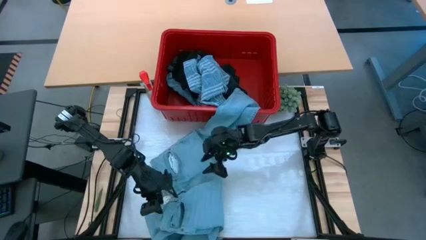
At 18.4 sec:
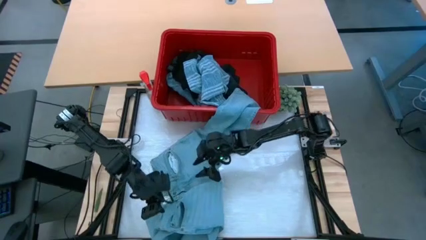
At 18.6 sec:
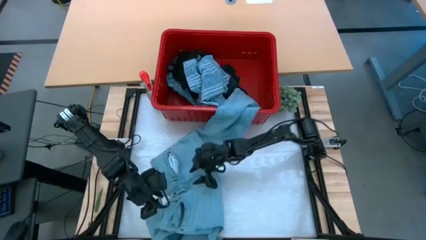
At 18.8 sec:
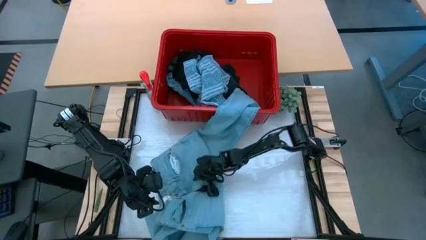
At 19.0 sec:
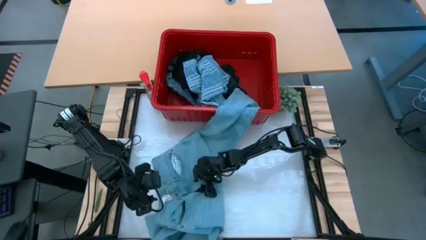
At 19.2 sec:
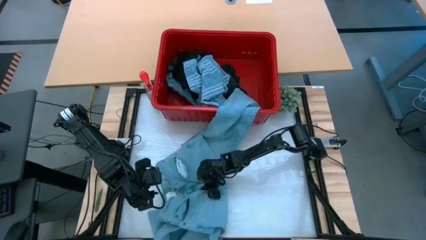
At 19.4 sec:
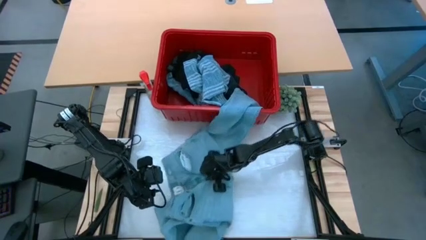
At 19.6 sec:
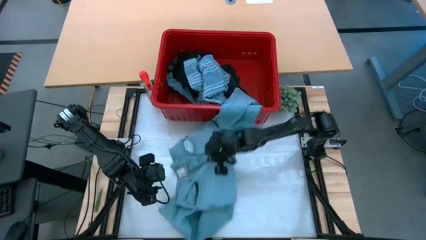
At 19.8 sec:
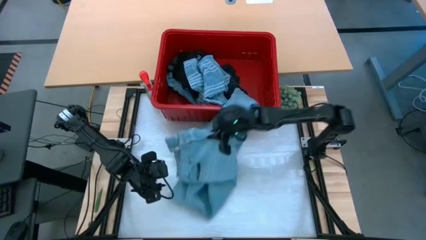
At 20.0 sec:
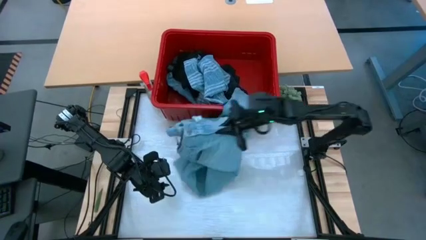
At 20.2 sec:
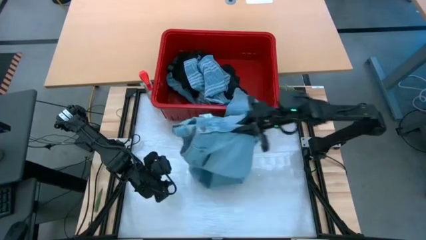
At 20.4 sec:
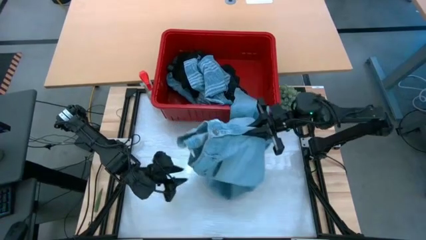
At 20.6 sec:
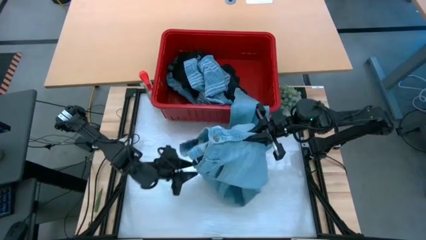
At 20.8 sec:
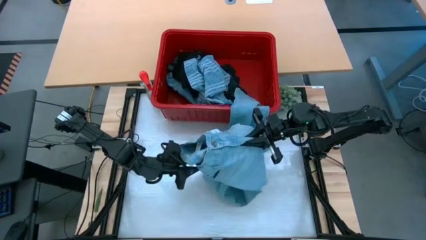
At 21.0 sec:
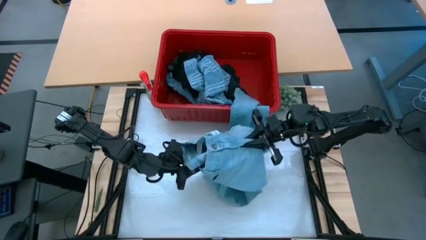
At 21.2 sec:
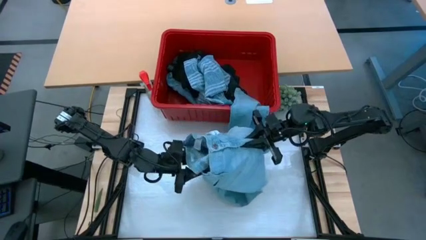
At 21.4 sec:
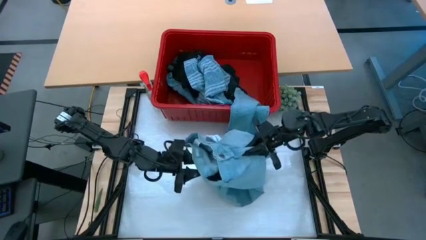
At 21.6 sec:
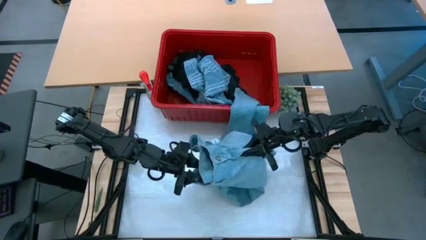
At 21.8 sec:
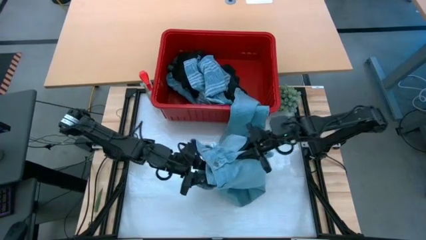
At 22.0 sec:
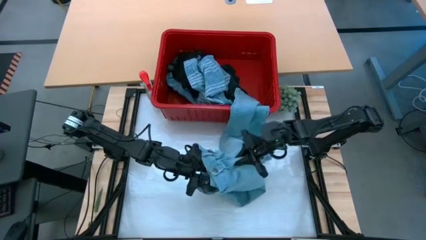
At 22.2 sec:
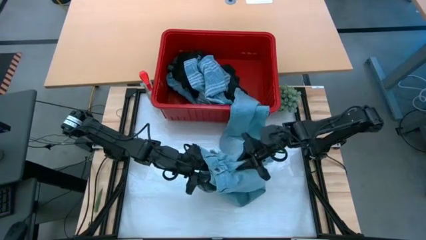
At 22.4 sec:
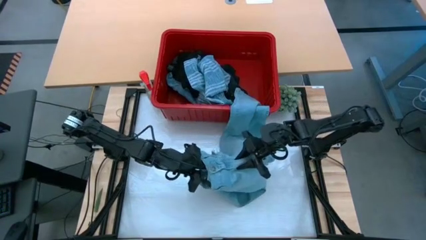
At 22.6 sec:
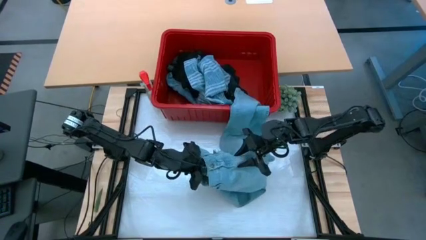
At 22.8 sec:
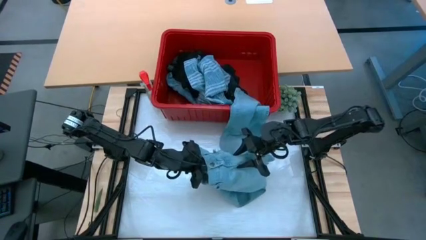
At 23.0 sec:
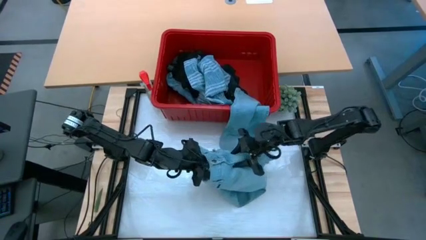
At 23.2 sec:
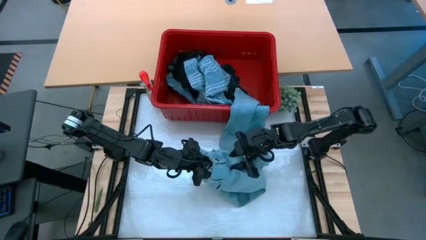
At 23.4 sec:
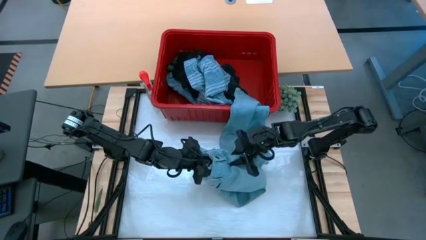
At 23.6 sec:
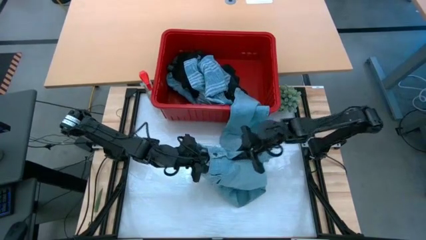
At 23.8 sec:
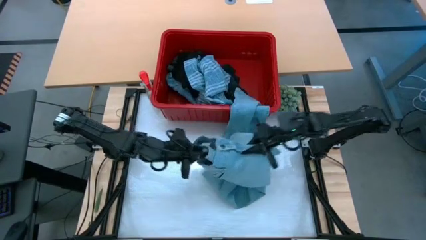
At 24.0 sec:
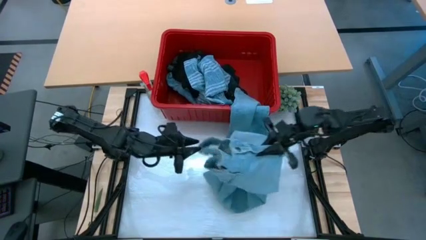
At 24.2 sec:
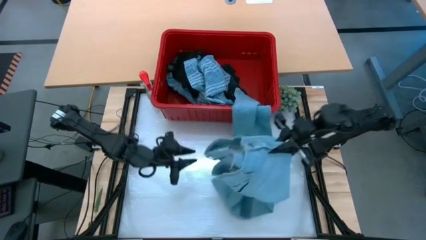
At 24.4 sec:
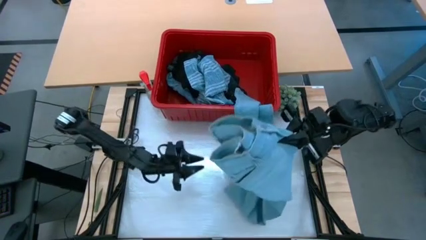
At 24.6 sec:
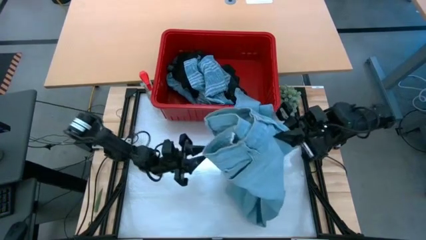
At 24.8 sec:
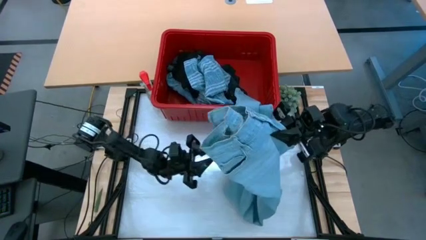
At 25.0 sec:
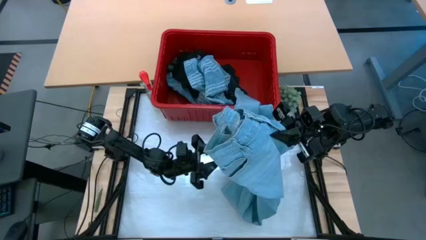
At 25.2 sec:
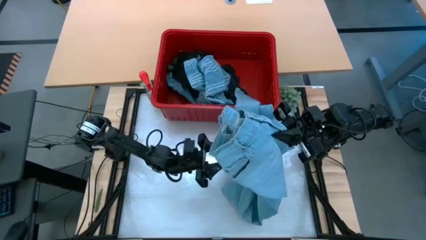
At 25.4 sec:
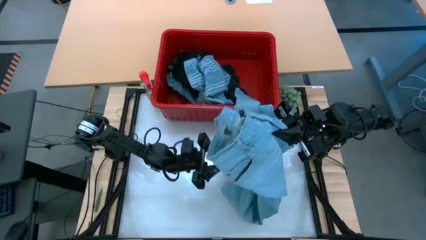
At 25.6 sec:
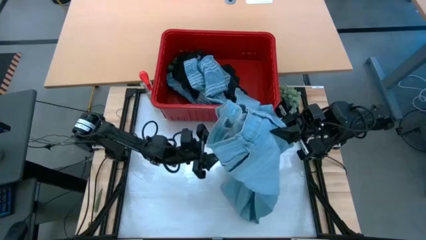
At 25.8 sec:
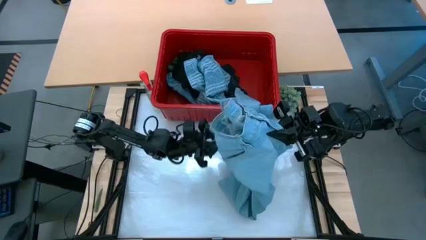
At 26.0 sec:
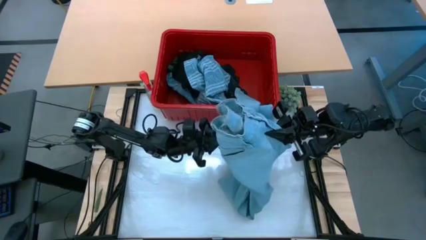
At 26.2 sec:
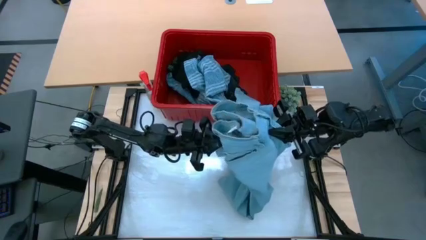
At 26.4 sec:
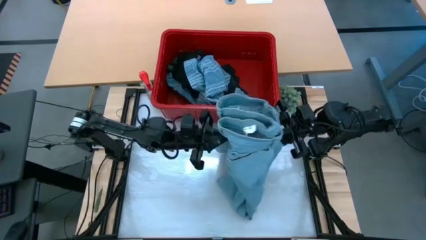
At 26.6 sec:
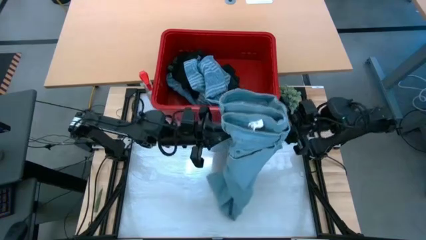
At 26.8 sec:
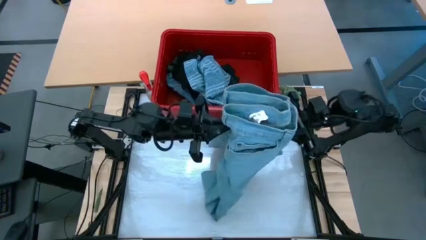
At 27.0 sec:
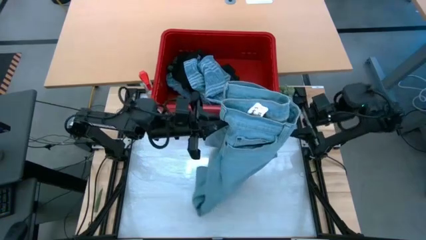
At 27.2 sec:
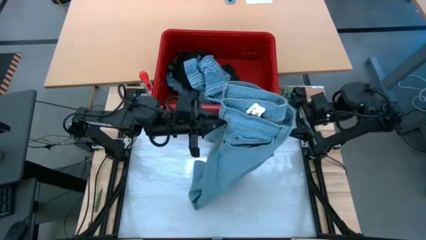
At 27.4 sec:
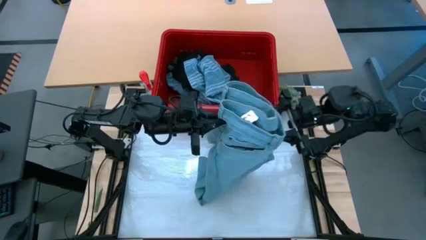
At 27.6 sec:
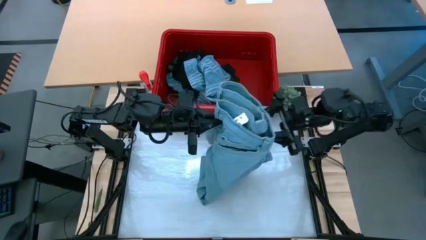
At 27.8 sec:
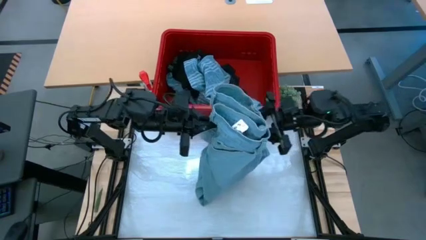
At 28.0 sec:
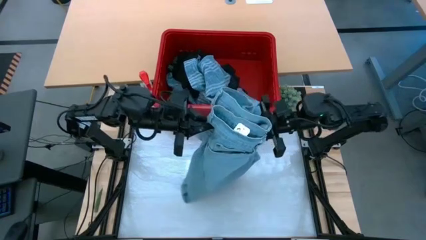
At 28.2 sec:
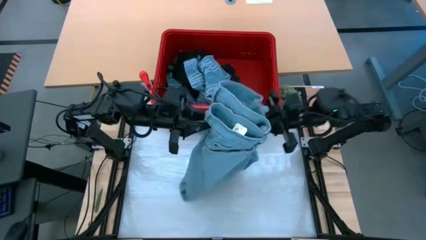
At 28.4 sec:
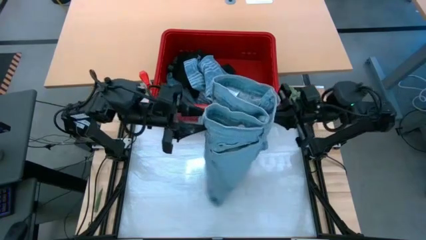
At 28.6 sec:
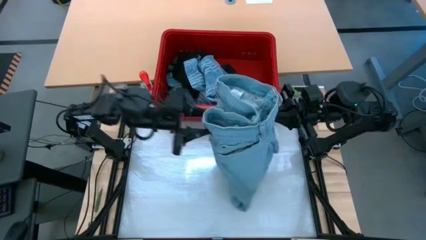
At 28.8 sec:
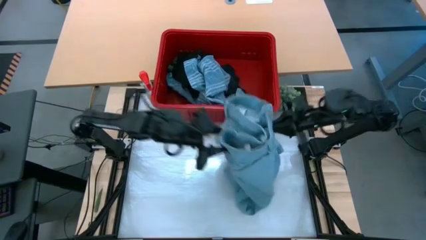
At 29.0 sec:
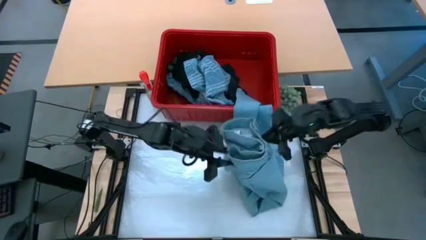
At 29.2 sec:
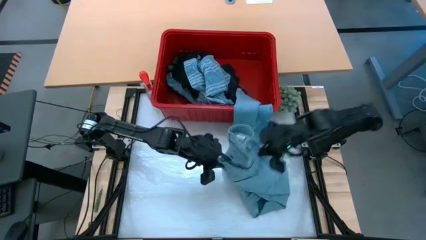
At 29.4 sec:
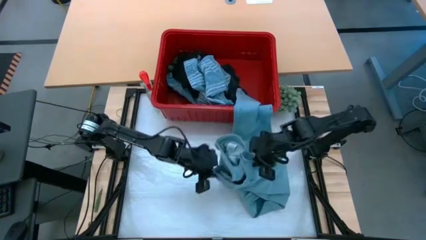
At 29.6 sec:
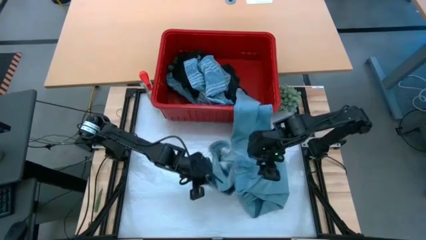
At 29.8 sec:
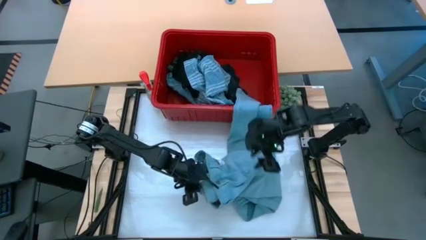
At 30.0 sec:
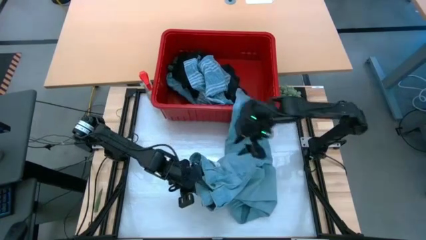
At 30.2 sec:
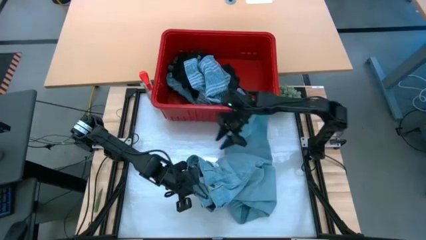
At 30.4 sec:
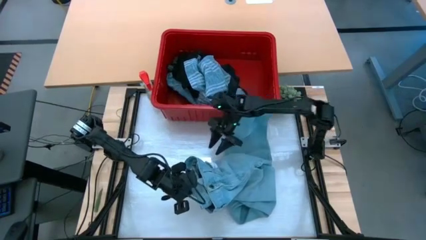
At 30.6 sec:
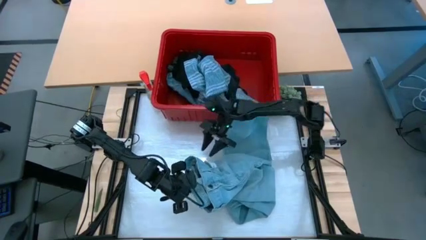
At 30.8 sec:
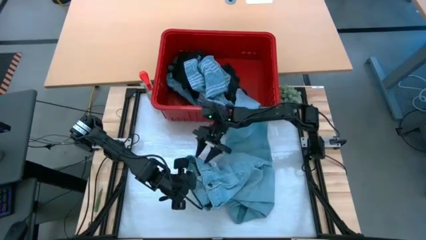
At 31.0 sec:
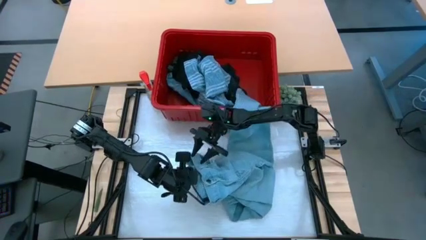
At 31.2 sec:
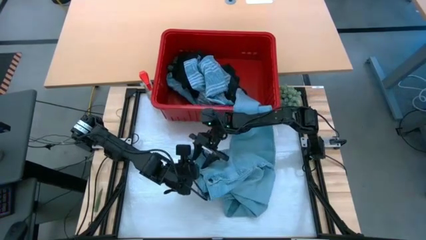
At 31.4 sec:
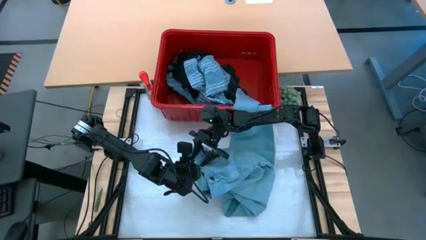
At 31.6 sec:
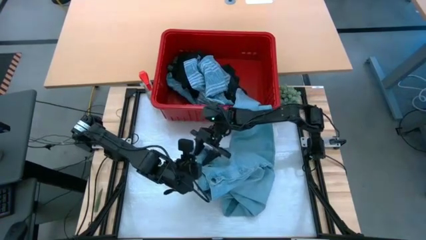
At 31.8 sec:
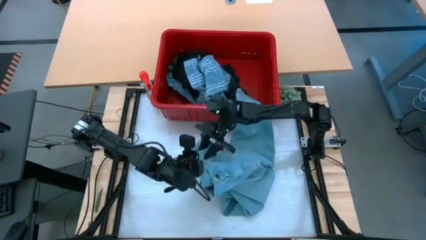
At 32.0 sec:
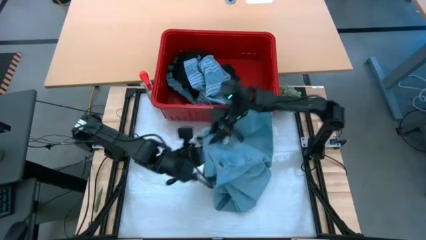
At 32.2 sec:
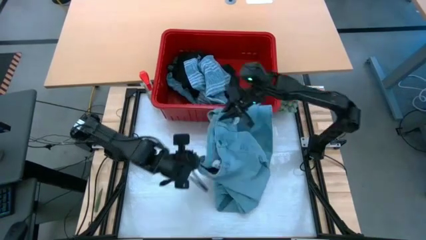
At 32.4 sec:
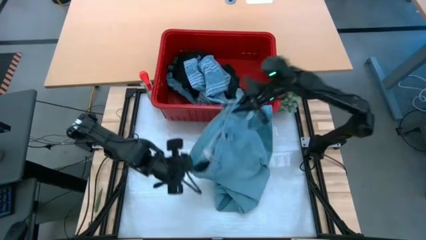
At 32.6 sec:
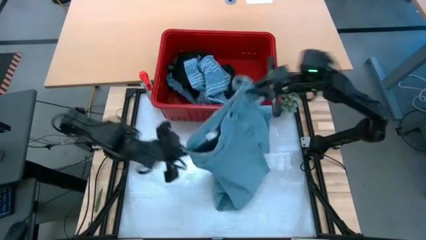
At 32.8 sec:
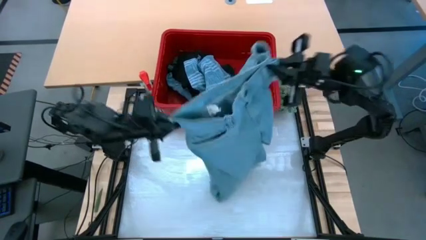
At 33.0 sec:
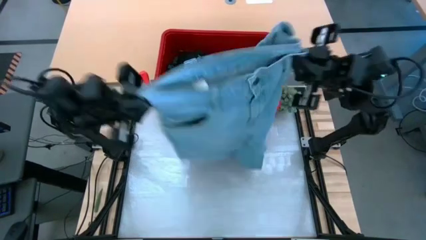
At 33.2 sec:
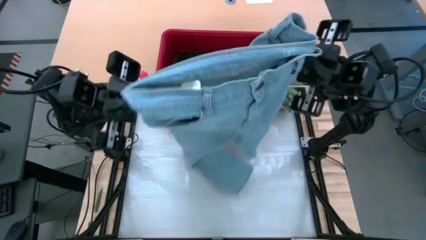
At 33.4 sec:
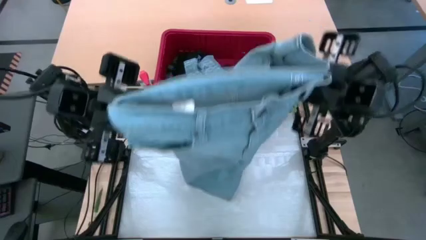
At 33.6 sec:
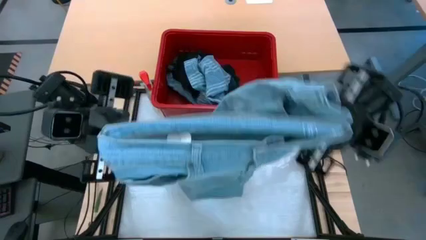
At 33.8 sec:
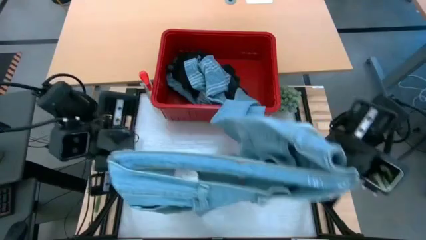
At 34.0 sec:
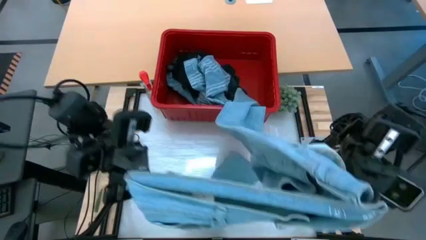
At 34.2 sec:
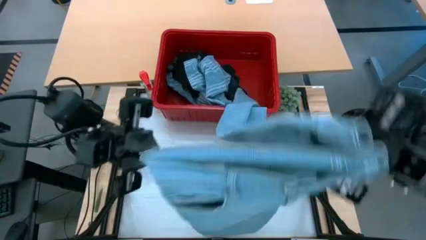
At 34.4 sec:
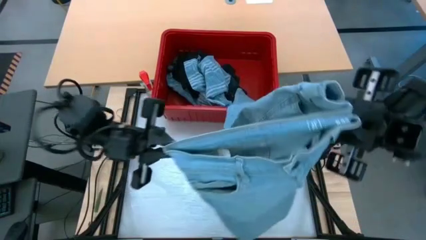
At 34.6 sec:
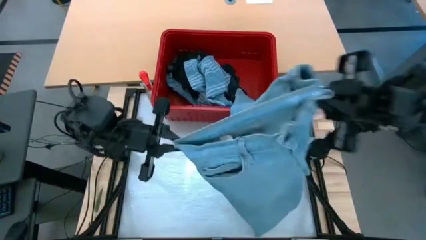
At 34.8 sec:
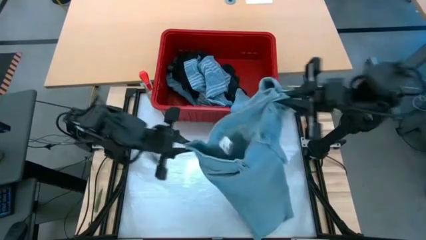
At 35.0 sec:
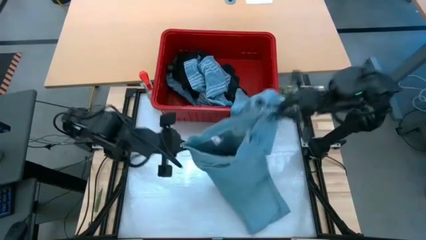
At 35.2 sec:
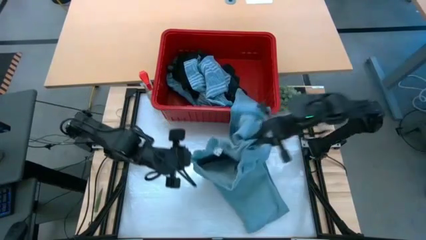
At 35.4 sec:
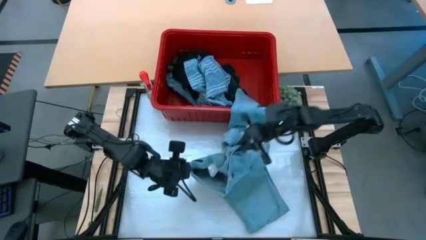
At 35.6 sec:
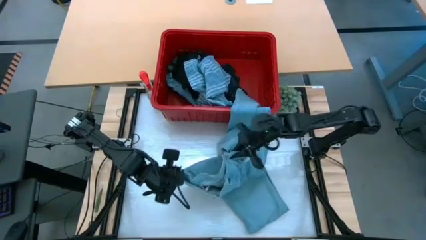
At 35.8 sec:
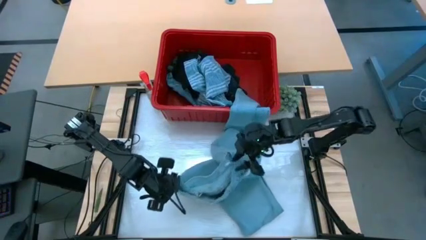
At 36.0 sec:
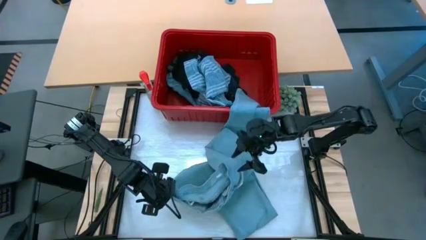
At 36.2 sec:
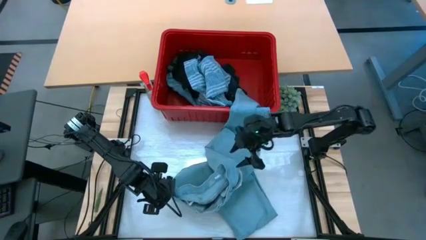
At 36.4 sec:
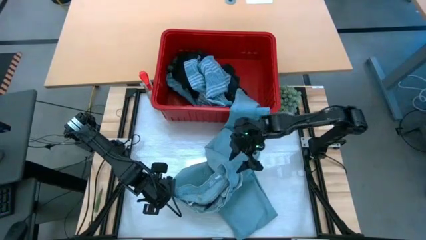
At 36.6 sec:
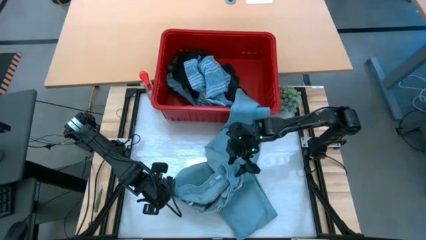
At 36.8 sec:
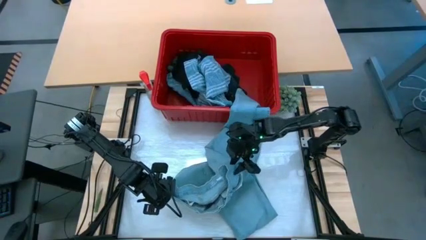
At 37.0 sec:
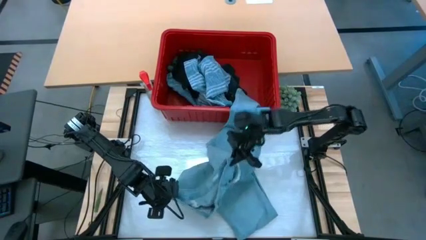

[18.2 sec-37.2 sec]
Task: Fold Laundry from Bin
Fold the light blue pants
